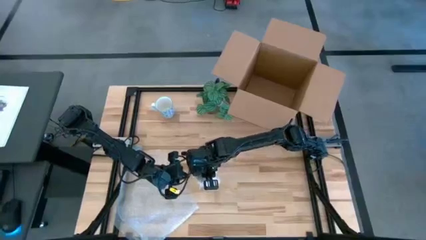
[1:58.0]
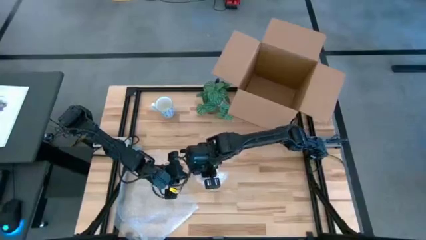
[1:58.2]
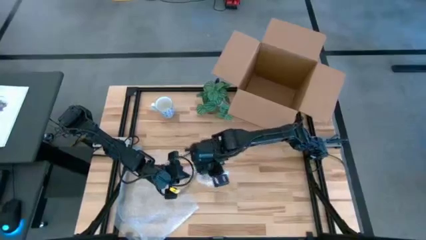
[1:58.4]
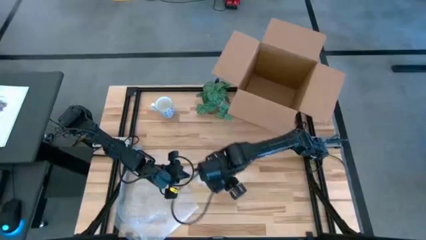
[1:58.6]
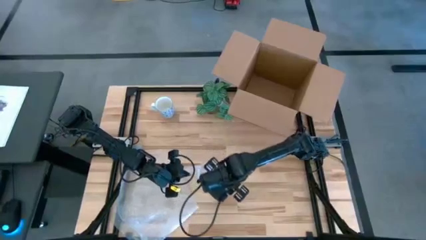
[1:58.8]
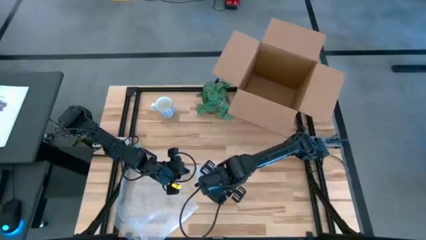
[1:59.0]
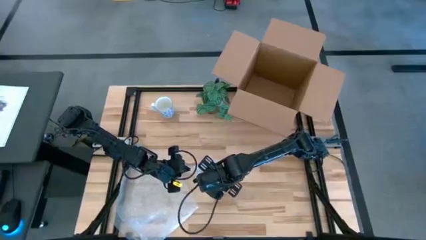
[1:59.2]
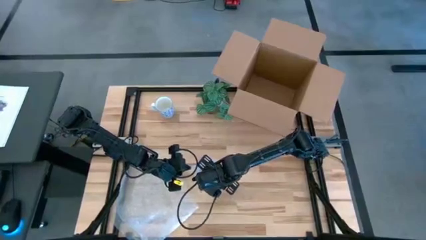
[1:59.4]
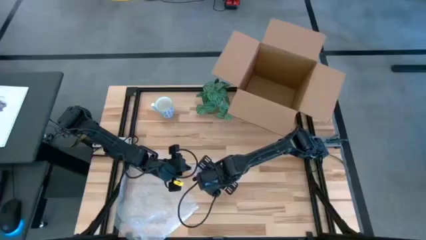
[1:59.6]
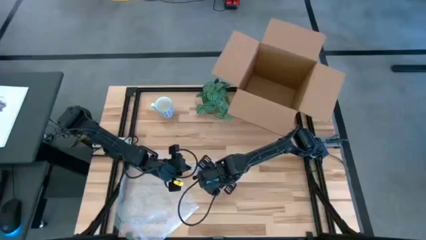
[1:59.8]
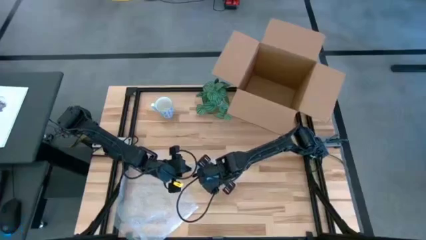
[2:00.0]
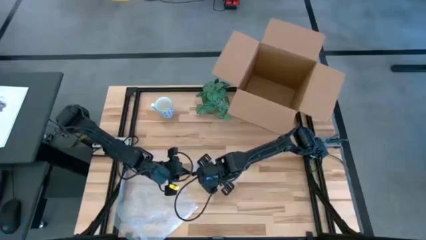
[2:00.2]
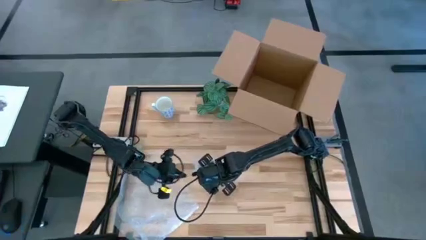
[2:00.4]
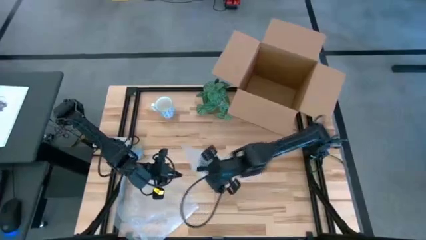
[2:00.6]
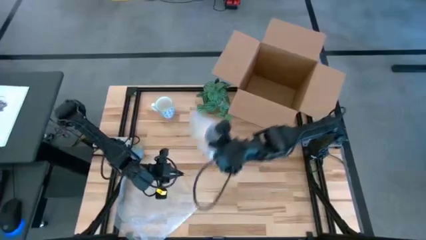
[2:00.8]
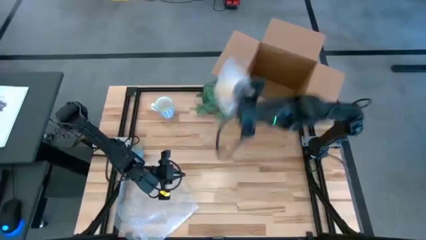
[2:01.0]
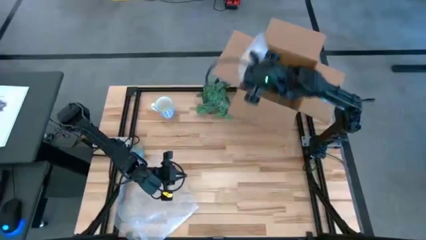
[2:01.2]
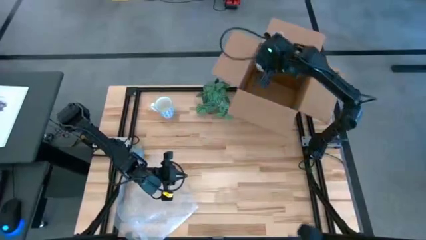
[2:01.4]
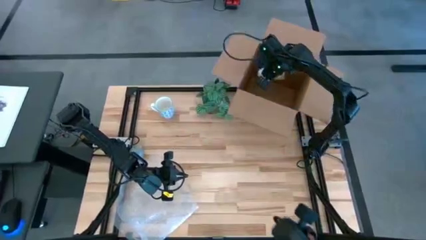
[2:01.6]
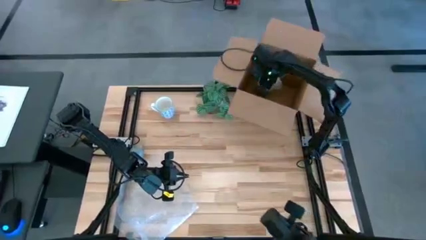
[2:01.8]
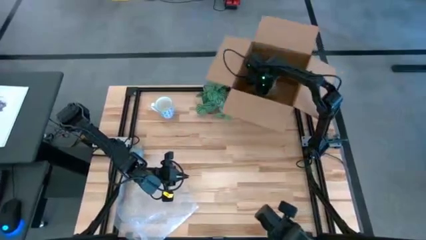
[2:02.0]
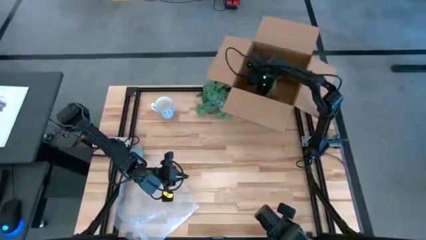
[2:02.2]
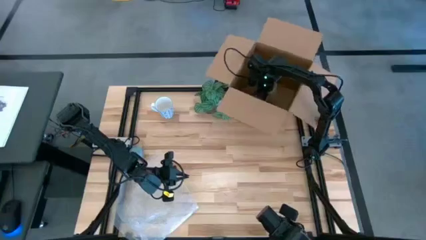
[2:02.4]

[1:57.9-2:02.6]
Task: wrap mug
Put the wrapped yellow mug into the cardboard box

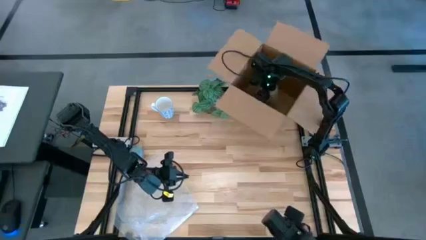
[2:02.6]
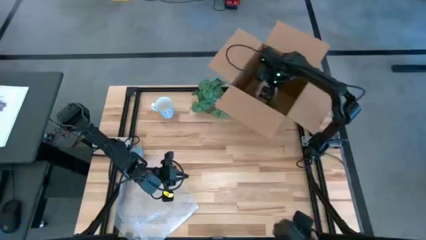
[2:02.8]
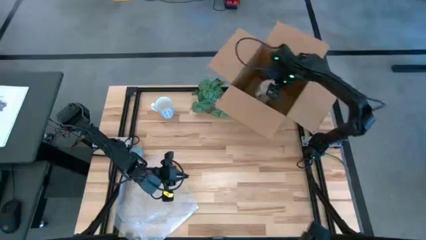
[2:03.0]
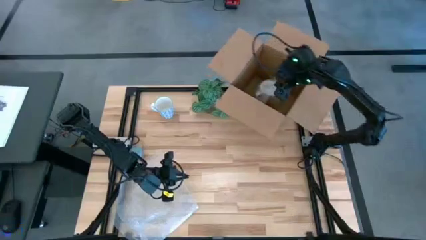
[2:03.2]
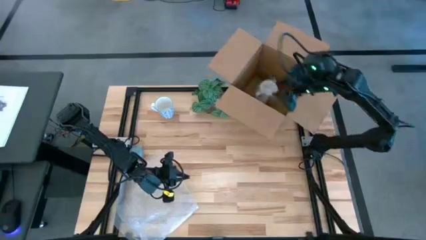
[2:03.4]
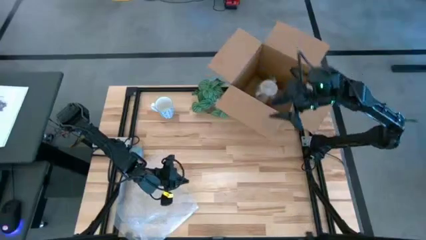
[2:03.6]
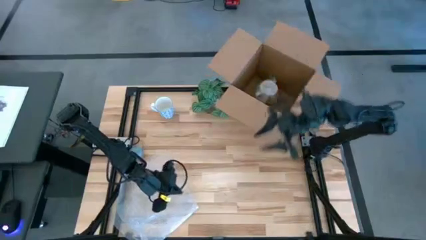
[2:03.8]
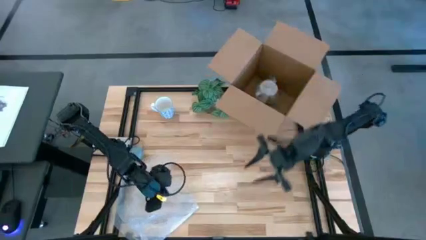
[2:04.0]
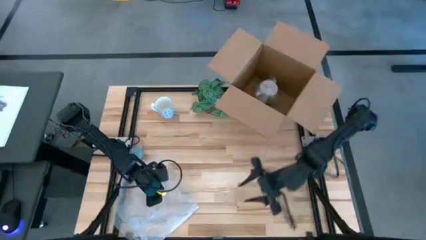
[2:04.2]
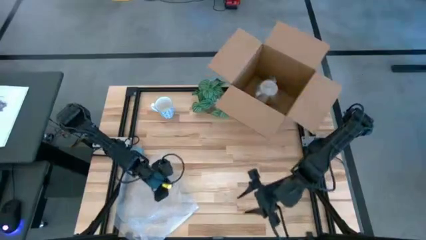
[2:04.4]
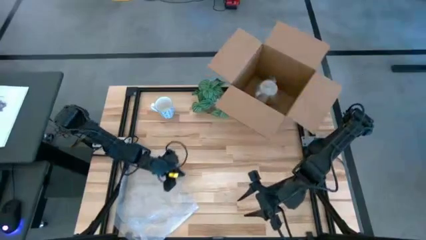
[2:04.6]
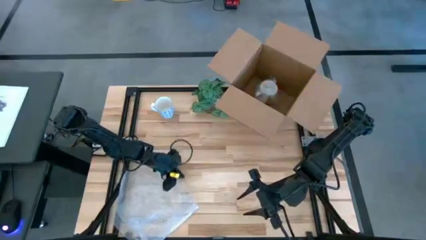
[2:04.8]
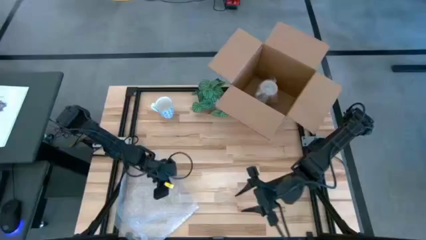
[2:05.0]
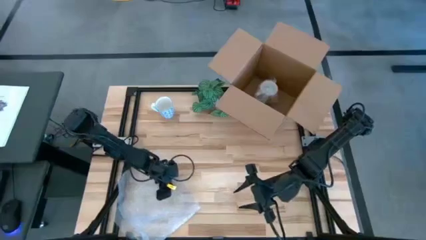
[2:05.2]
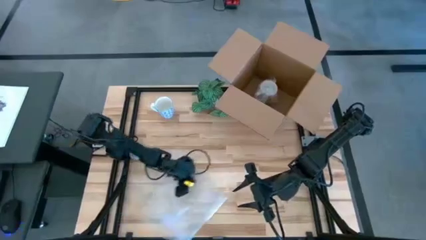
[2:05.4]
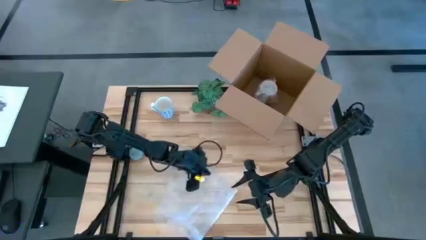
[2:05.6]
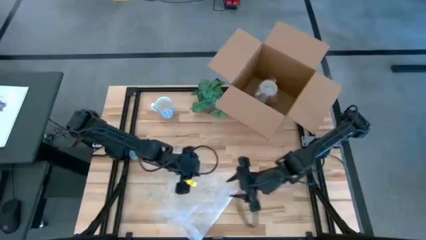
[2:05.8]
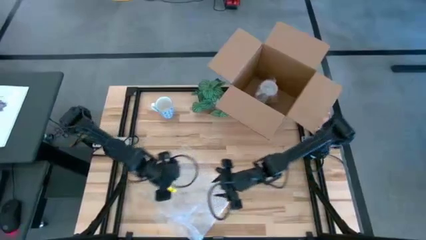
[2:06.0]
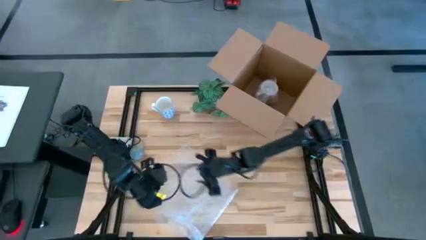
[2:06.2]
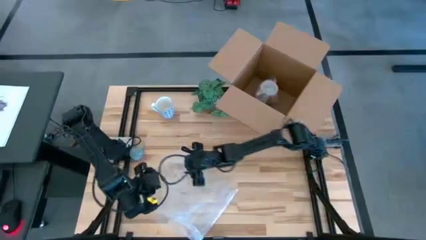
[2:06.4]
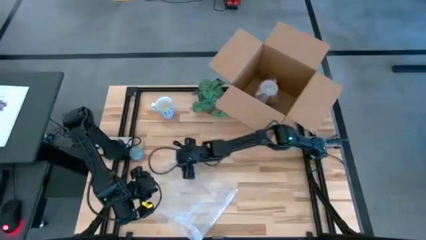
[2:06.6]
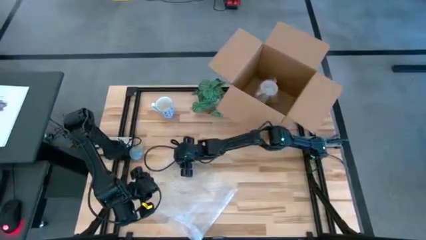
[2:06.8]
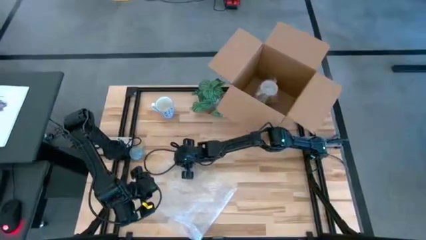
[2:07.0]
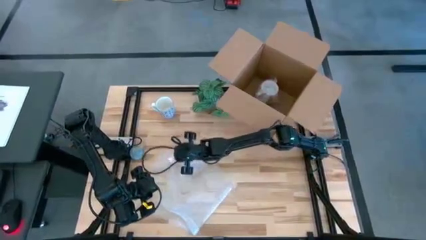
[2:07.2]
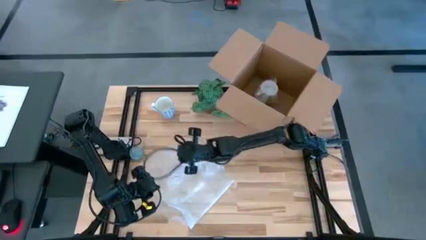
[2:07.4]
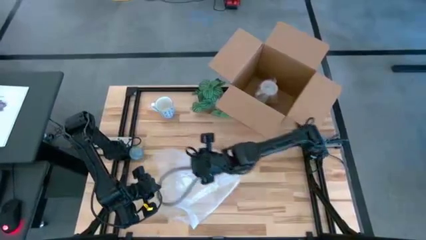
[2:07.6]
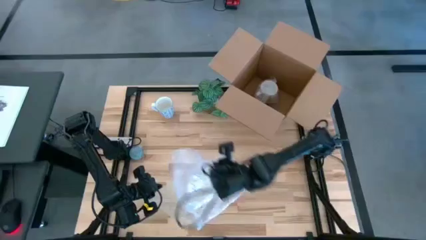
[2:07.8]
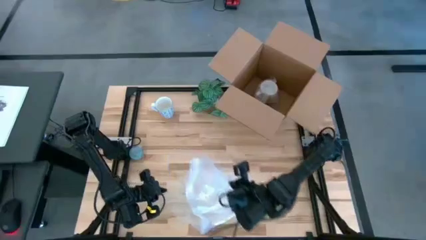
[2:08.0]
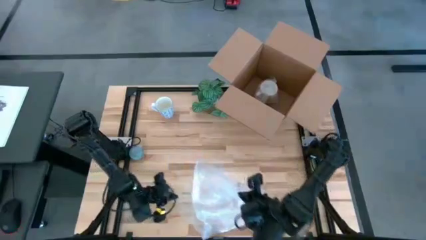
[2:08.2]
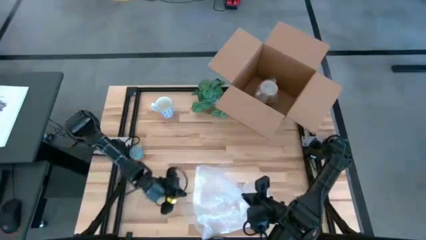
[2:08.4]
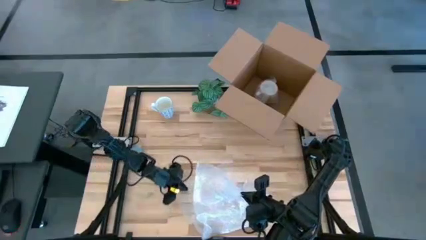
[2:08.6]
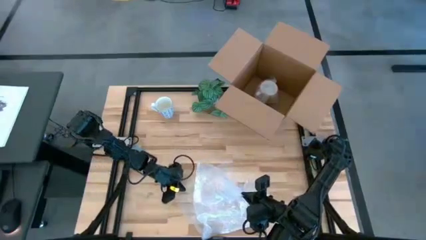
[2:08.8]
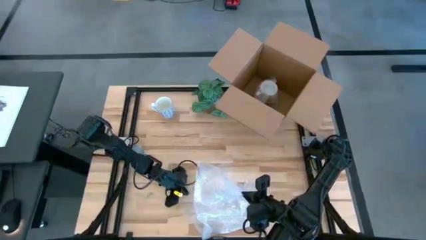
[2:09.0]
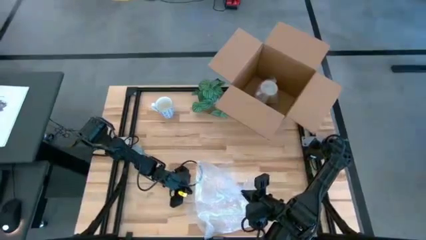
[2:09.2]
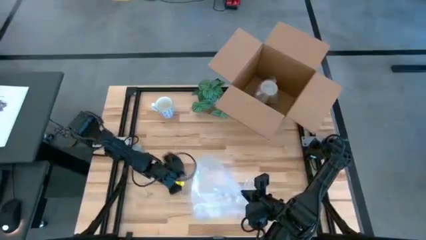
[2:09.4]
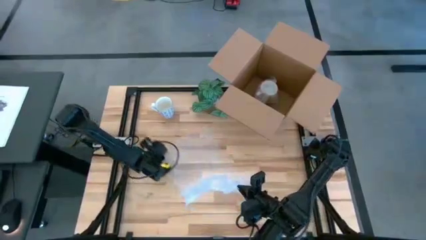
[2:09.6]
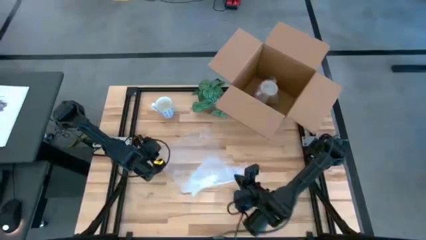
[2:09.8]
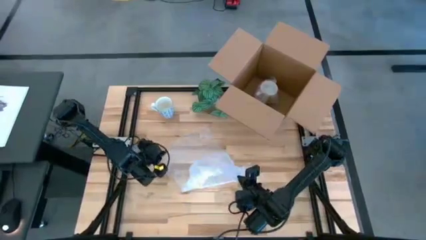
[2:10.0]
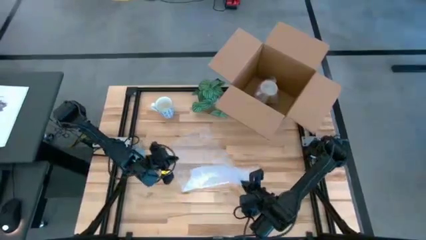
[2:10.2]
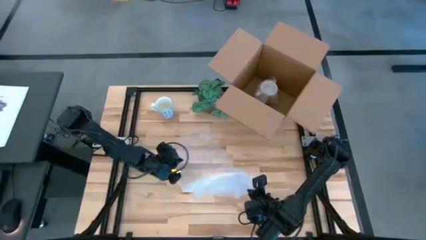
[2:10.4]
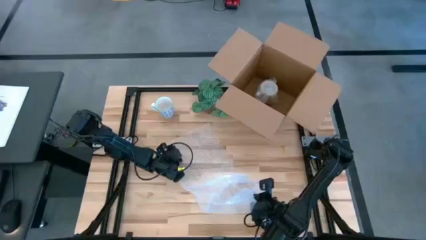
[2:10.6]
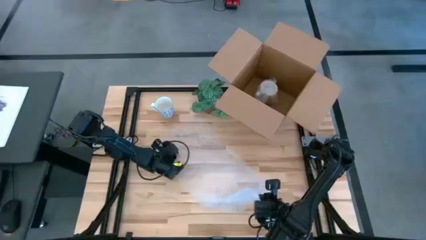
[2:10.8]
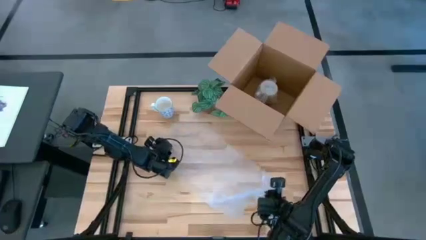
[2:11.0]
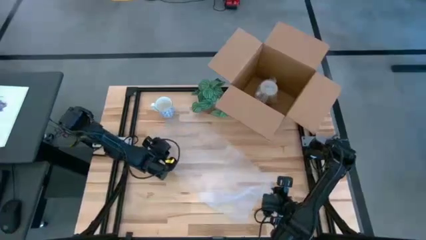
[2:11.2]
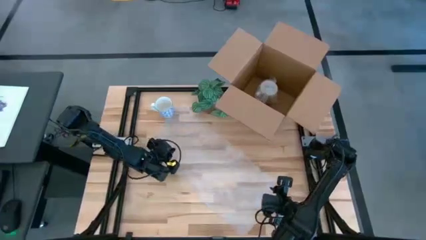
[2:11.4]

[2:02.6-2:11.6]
Prepare the bubble wrap

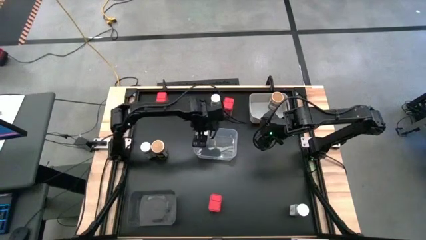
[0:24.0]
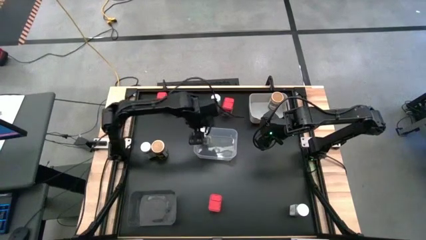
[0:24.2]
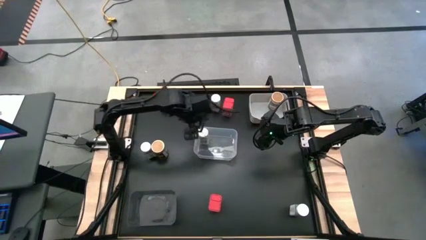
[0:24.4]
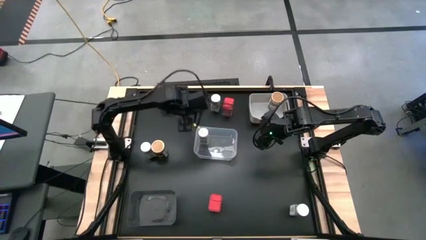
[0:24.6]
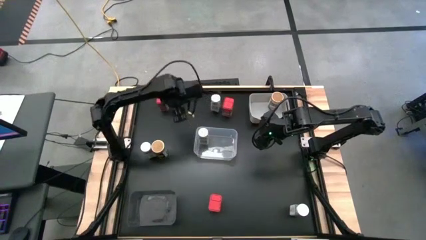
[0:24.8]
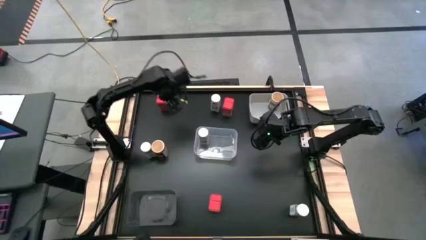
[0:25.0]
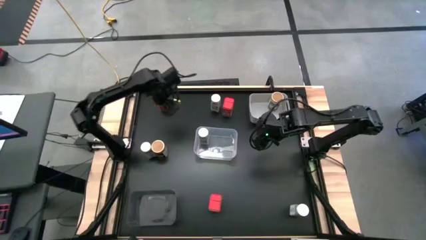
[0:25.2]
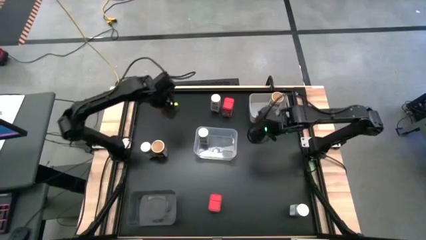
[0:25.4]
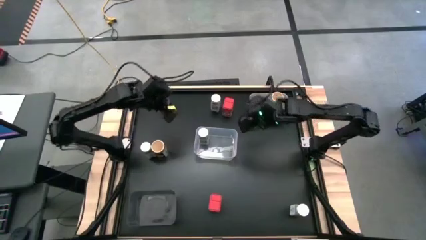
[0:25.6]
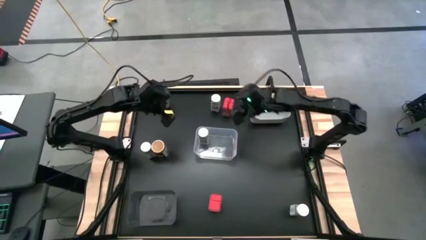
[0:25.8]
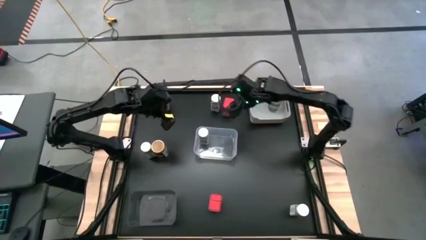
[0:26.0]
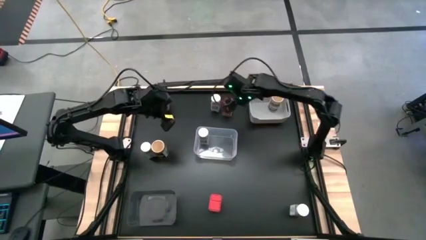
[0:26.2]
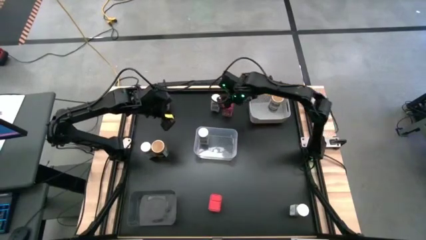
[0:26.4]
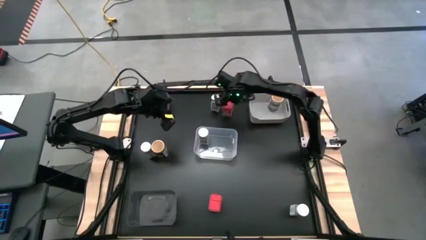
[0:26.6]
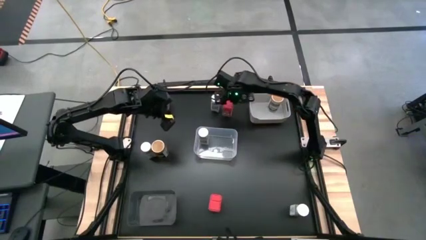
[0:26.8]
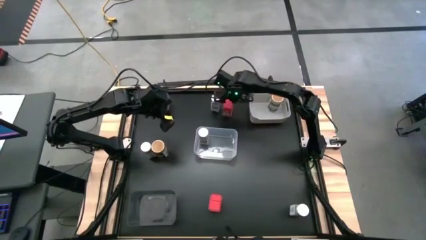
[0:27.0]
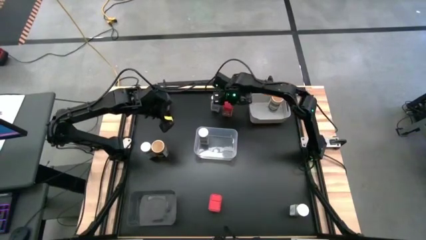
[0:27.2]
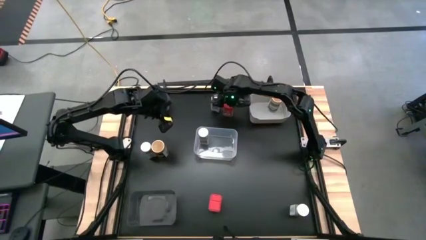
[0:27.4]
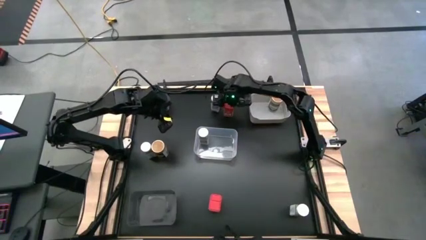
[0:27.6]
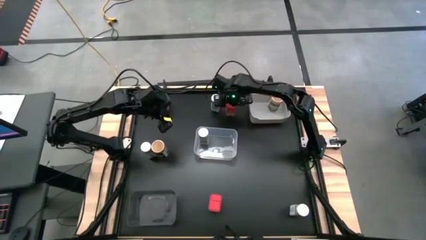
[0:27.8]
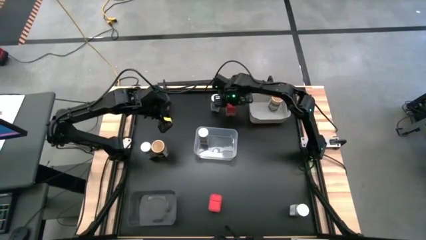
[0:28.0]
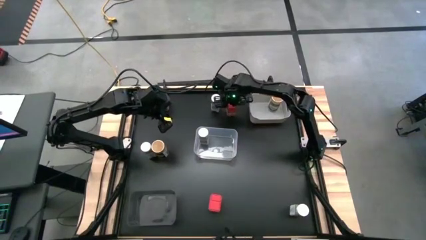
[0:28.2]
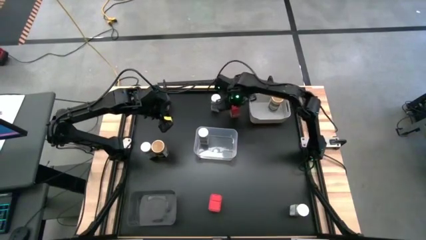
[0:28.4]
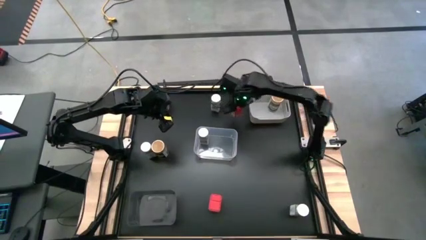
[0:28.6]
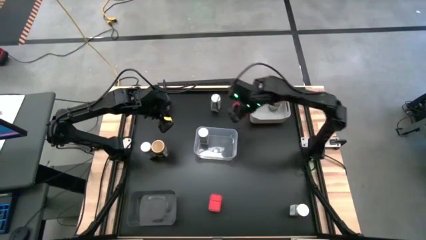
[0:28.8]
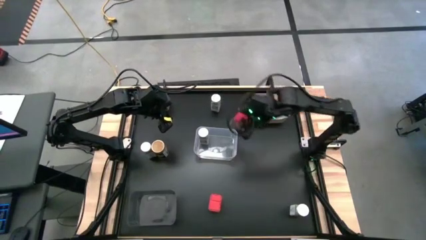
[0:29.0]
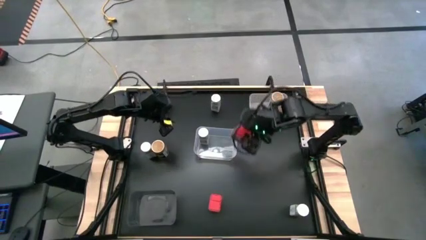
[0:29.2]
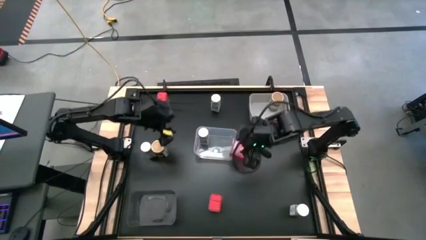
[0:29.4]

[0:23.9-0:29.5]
Task: Sort spices by type
Put the red seasoning can into the black bin
